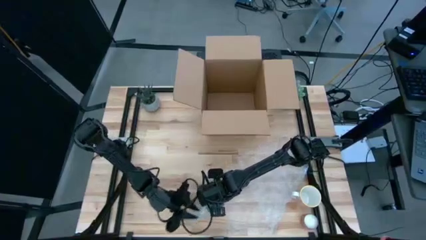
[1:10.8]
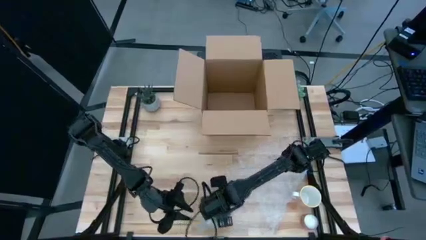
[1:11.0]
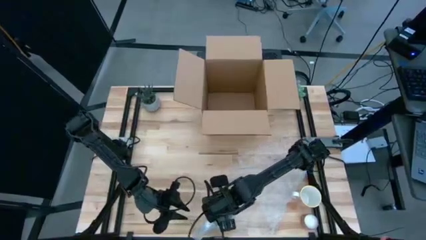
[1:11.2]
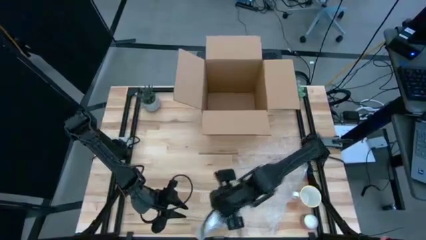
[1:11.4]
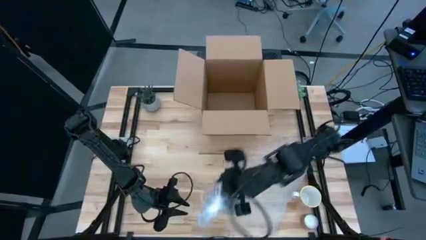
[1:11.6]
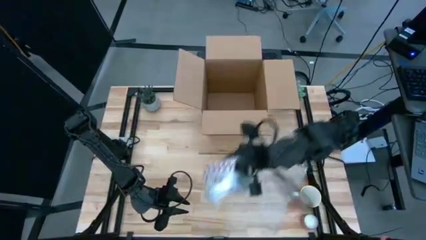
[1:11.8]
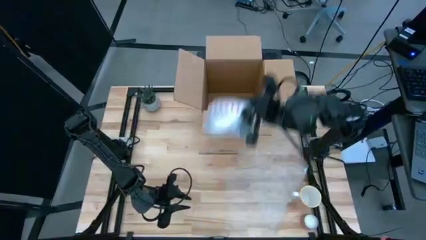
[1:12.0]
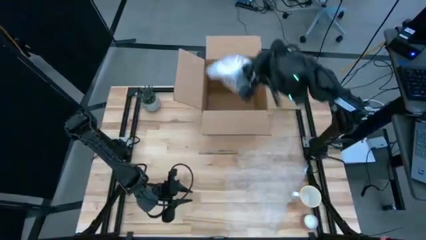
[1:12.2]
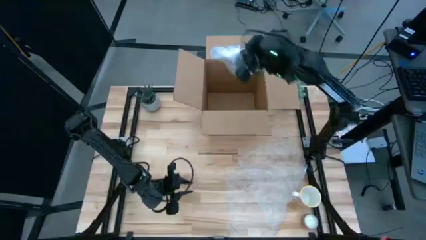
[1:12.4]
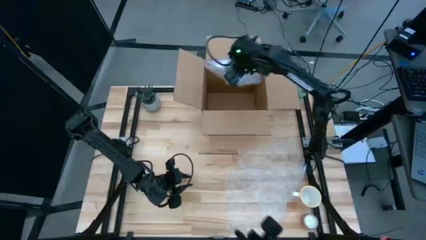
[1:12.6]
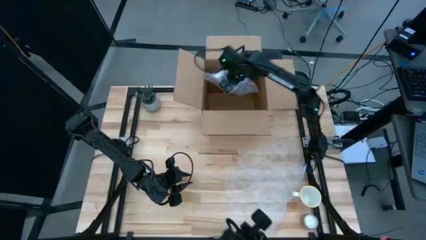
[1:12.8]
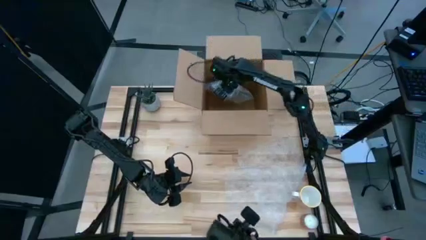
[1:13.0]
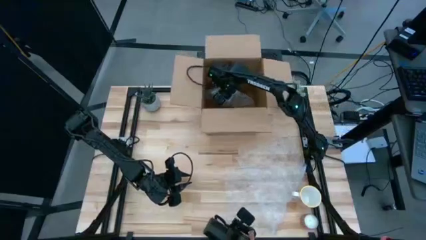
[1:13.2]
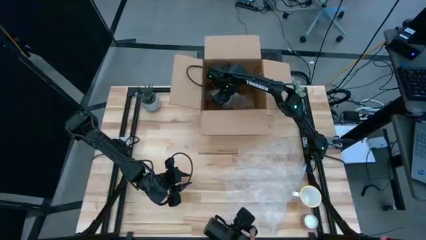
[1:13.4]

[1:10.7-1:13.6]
Task: wrap mug
Put the wrapped red patterned mug into the cardboard box

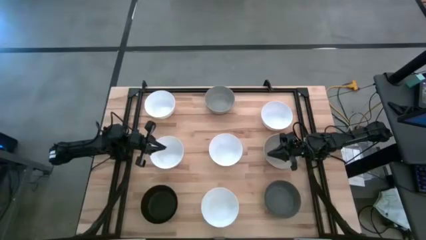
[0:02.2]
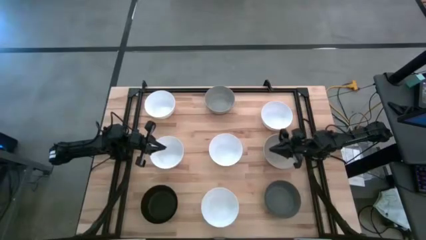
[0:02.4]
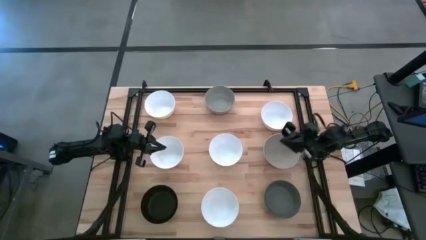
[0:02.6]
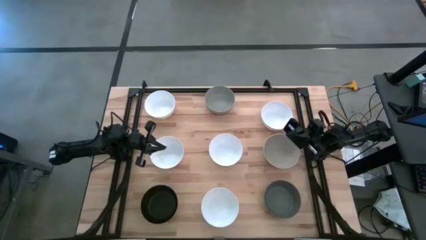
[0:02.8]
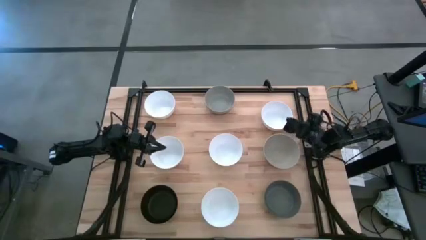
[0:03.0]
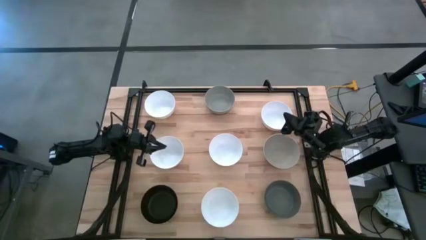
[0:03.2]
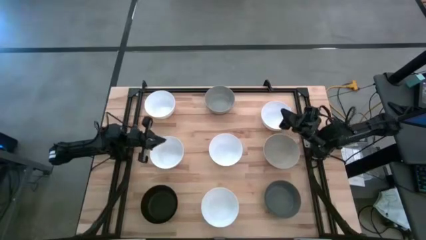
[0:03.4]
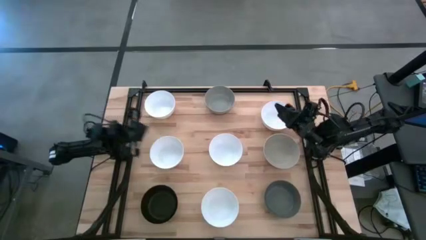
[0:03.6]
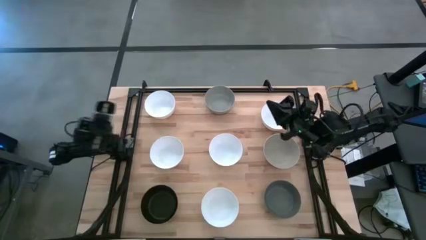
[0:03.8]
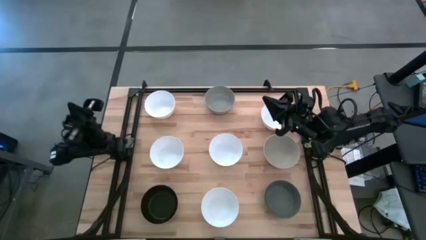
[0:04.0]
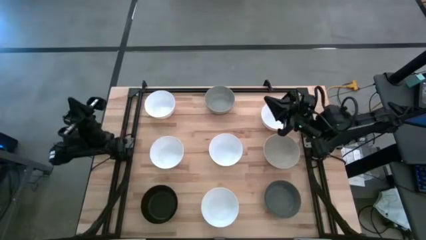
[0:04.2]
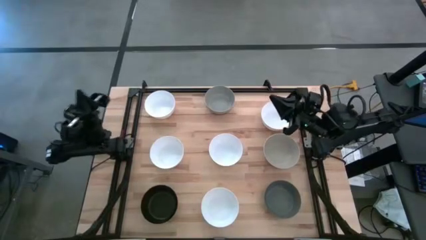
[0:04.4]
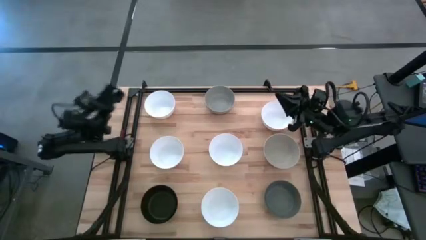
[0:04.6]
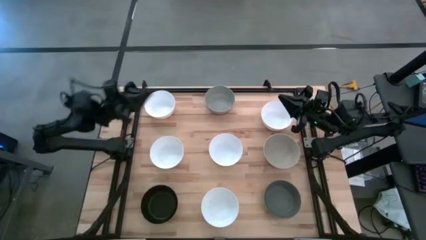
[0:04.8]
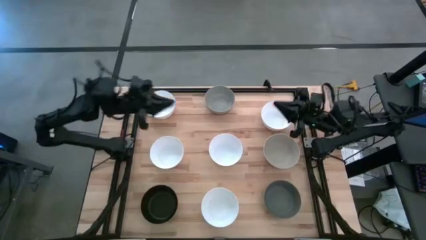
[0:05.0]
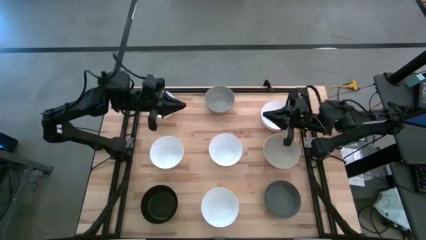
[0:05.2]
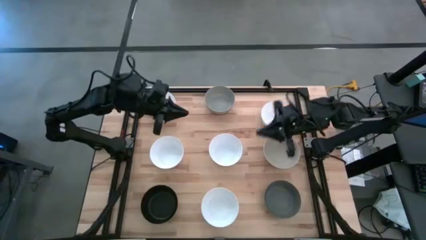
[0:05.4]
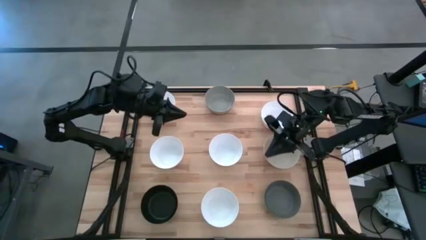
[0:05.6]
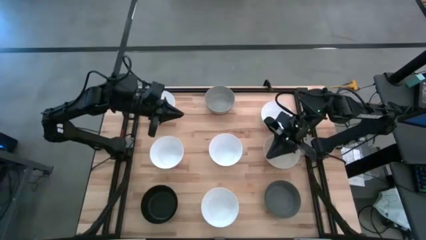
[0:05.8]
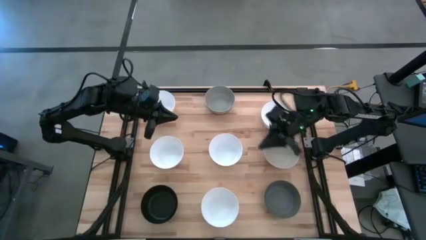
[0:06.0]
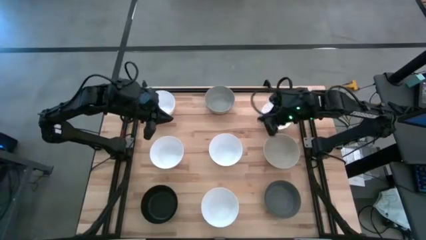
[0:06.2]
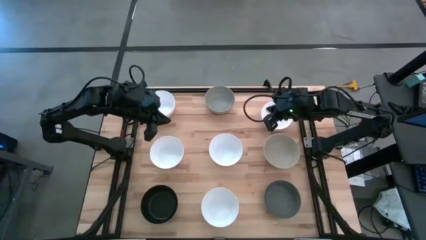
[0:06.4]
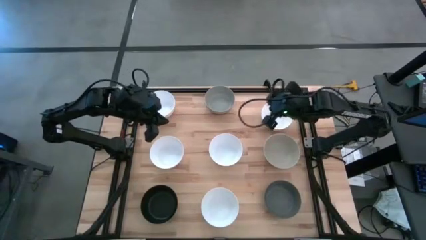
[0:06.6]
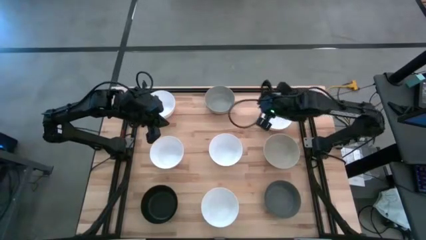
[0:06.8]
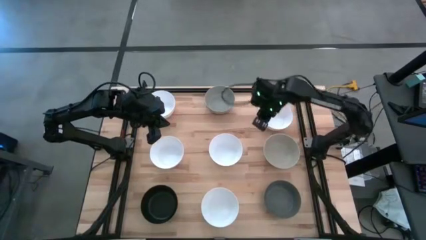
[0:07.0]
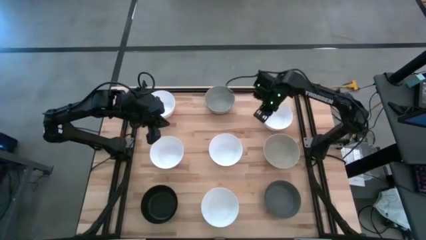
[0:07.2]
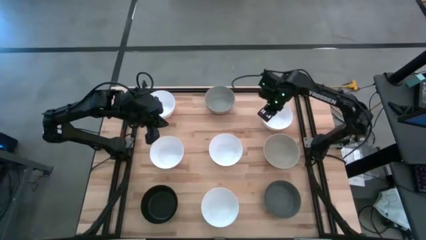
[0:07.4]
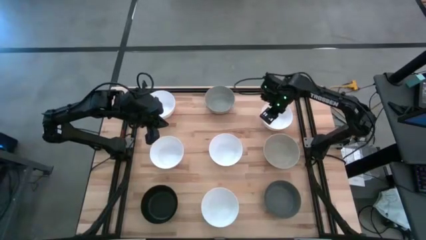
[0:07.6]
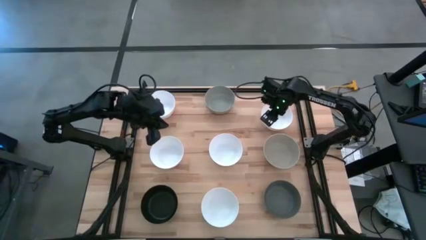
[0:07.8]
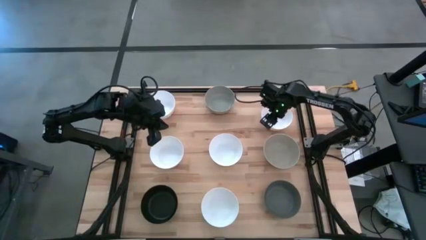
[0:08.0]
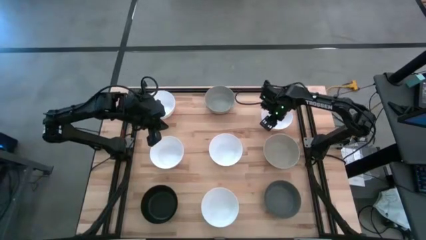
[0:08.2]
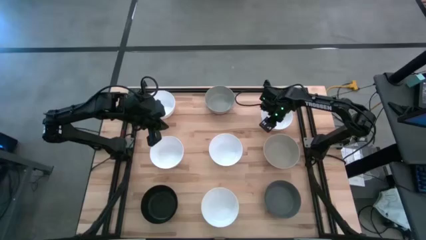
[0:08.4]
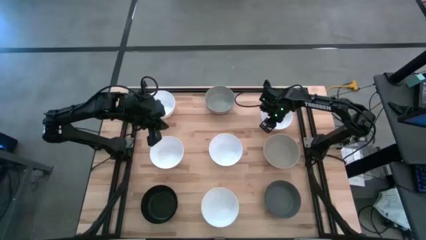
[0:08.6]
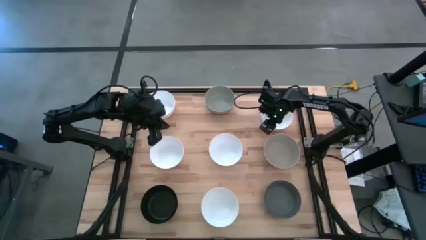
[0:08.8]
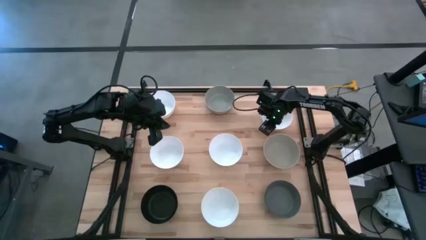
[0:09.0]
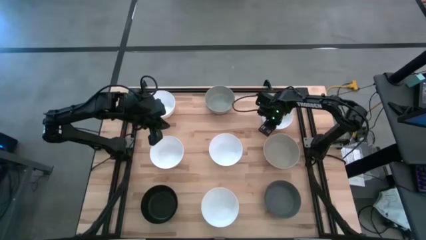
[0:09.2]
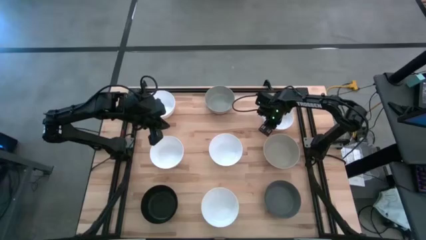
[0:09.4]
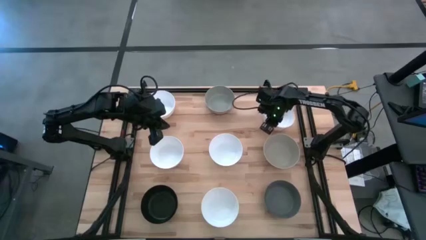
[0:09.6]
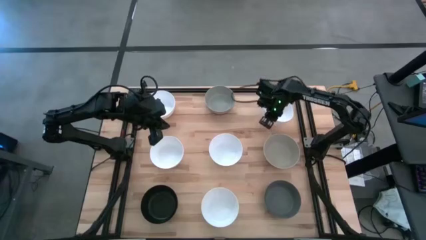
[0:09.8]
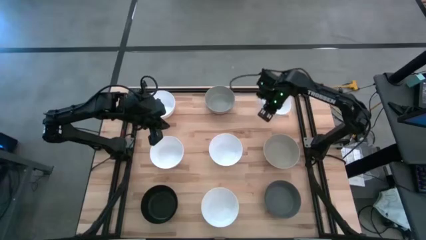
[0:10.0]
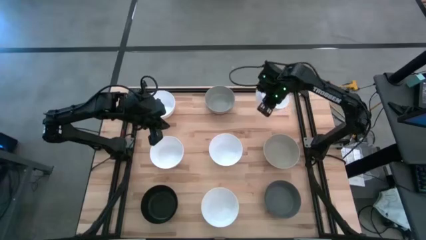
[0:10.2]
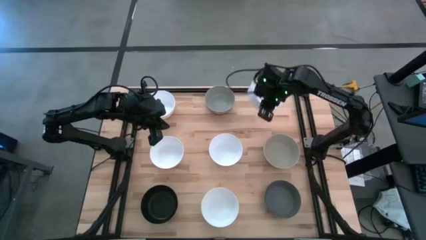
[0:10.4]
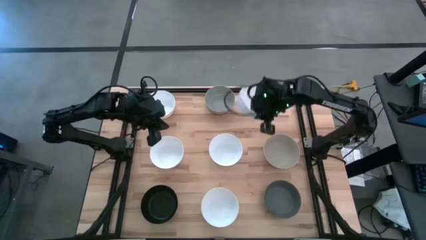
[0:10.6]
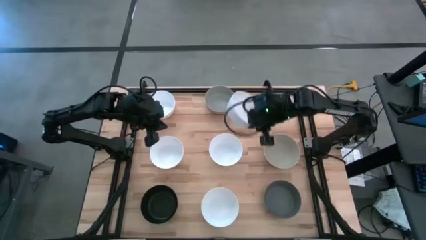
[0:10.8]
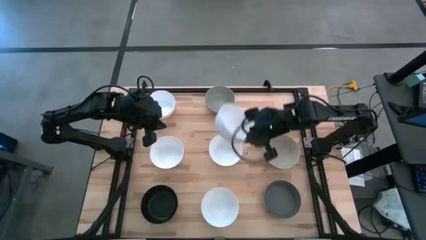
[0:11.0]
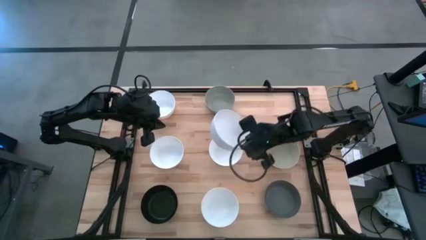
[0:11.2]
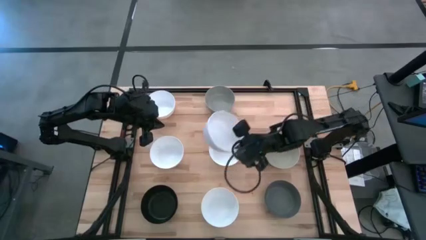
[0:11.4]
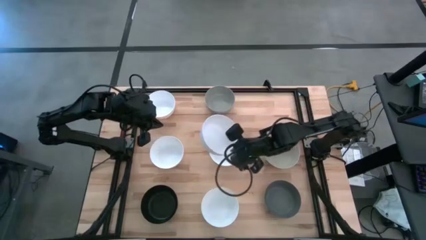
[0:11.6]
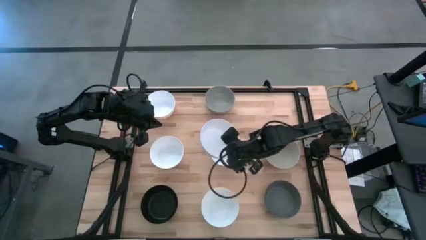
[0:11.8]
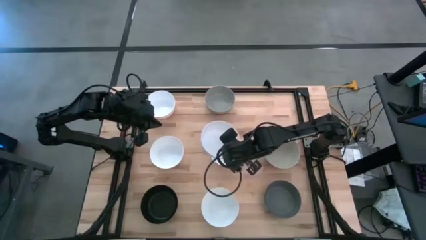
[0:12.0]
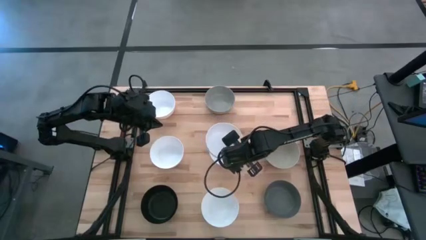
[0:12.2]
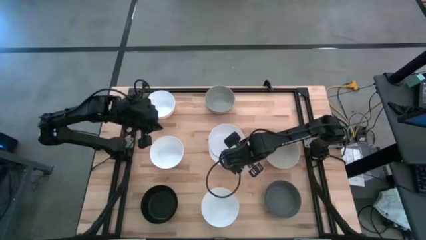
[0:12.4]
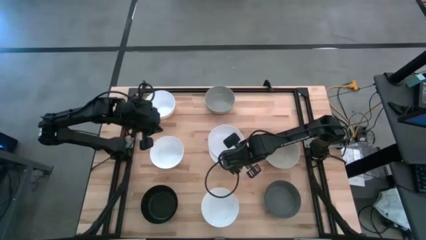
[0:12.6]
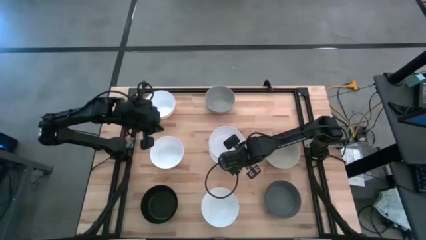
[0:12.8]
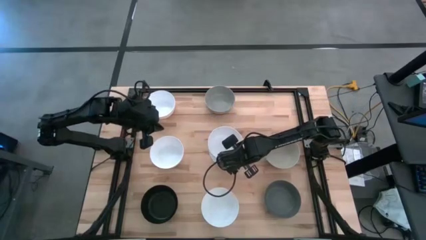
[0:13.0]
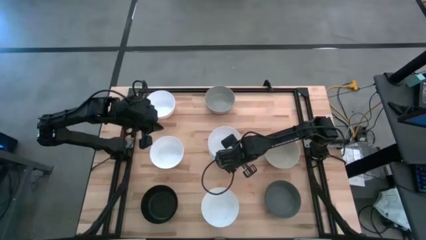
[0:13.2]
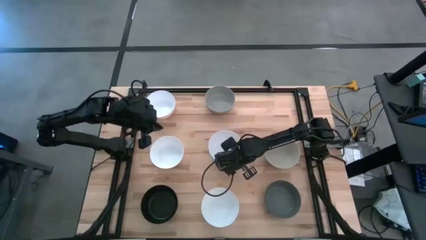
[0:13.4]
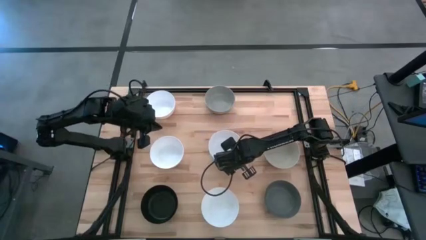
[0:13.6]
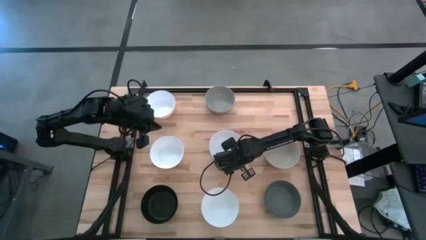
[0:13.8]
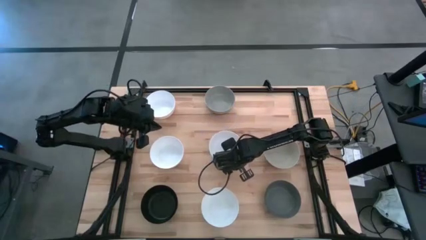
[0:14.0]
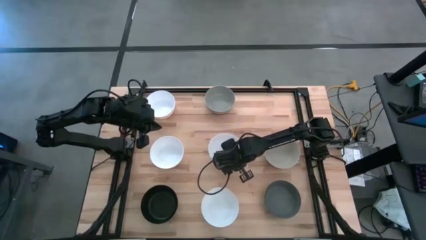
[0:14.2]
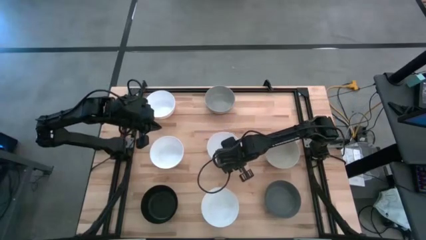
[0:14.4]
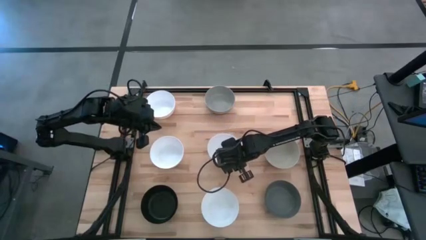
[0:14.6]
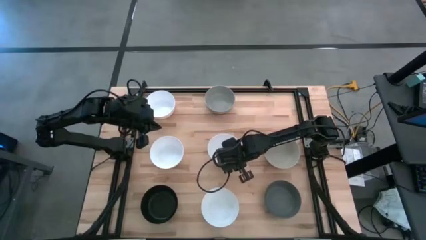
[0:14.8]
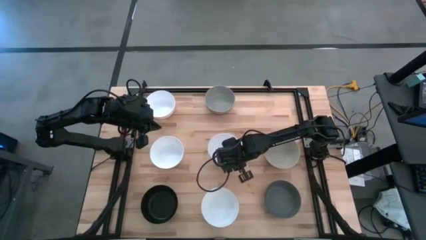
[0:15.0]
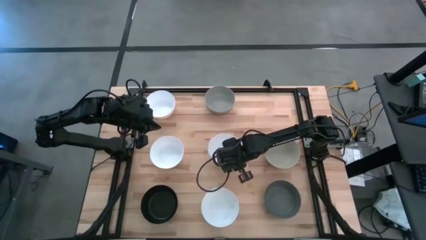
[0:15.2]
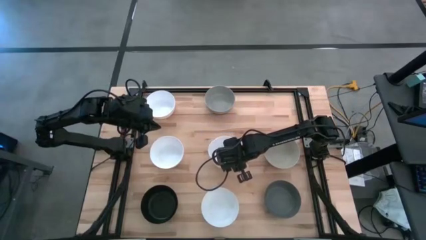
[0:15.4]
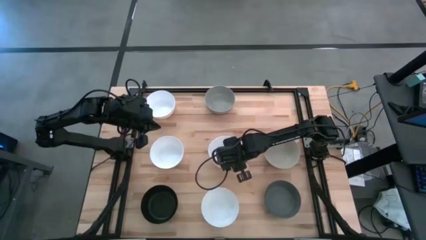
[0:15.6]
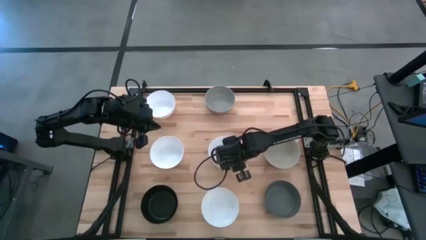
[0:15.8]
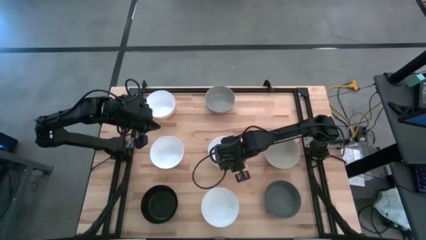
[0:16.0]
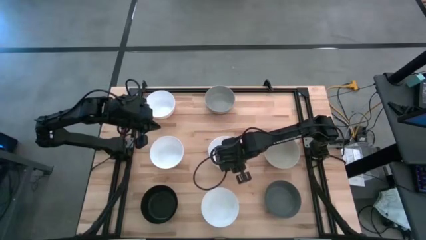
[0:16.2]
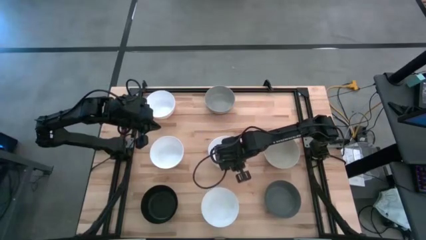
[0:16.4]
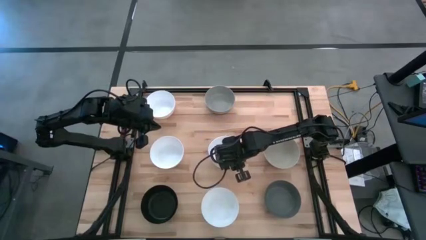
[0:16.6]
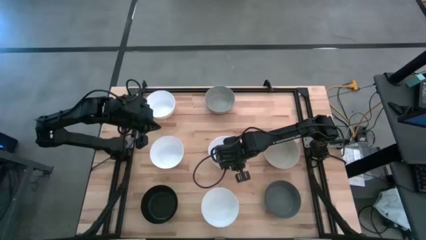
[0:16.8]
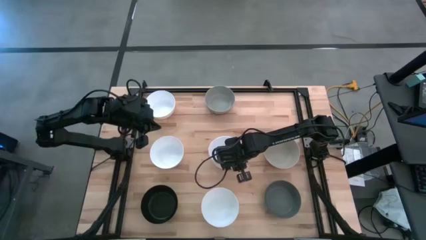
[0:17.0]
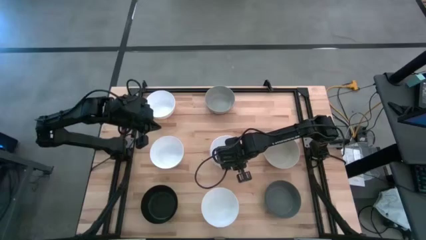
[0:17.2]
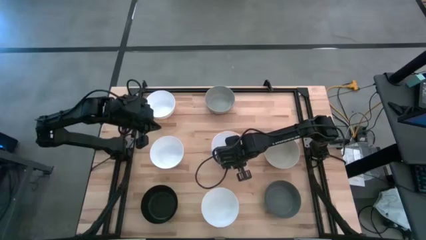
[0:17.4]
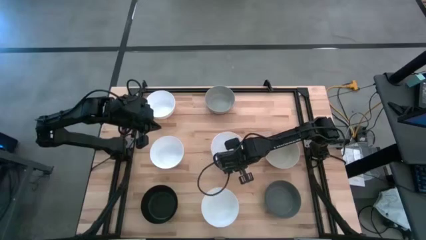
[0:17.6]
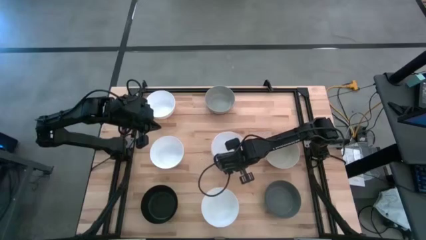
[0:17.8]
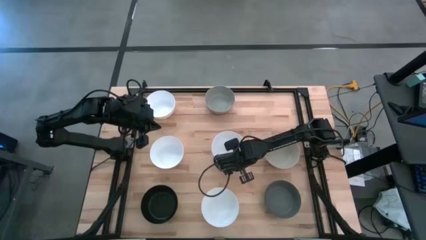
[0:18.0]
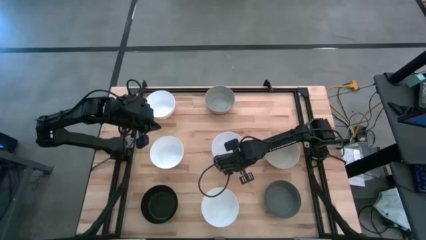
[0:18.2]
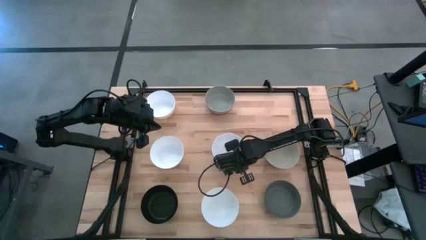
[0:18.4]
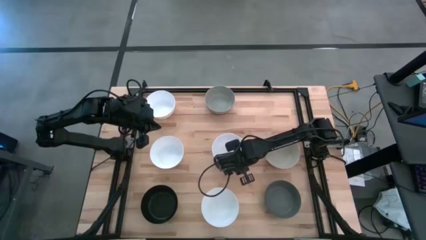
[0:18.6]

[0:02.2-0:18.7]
Task: Nest bowls inside each other
Stack the top right white bowl on the middle right white bowl
